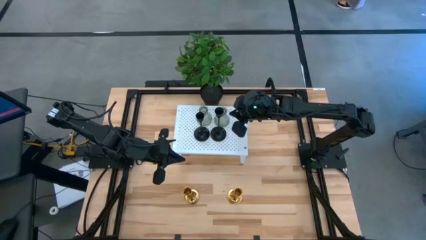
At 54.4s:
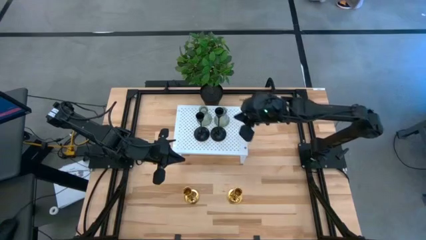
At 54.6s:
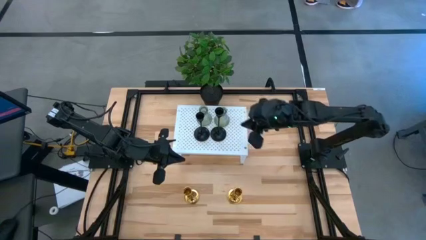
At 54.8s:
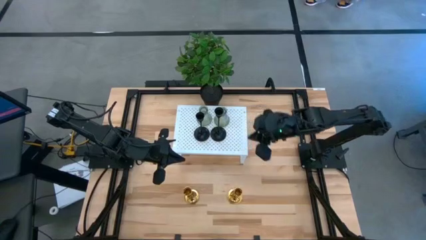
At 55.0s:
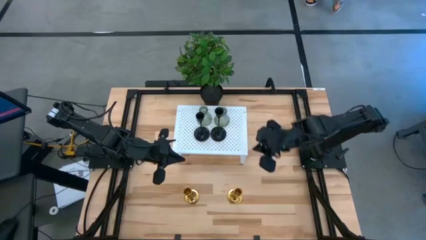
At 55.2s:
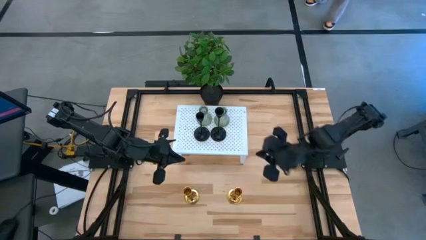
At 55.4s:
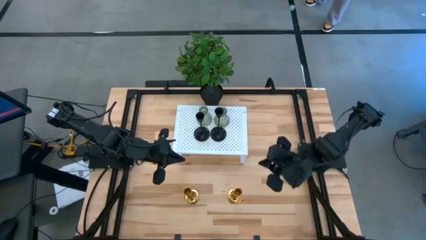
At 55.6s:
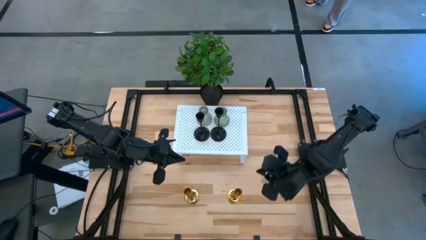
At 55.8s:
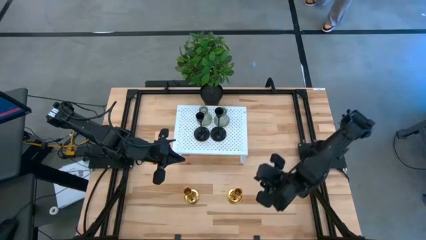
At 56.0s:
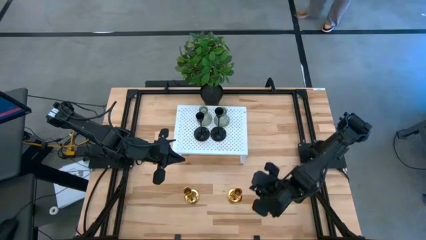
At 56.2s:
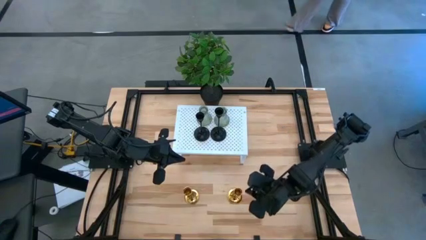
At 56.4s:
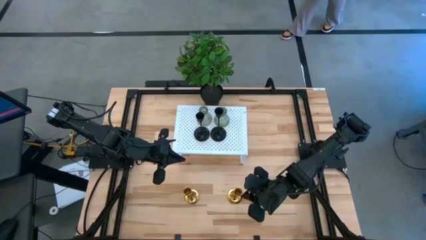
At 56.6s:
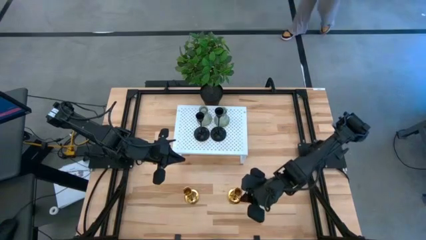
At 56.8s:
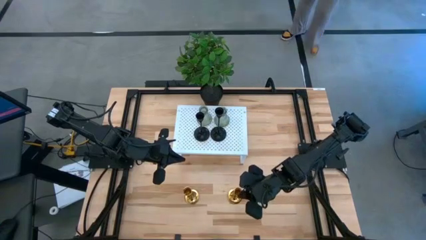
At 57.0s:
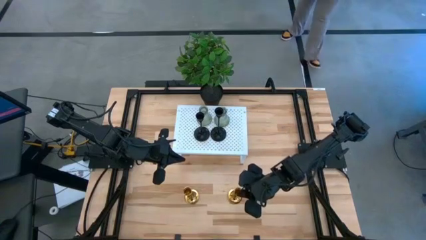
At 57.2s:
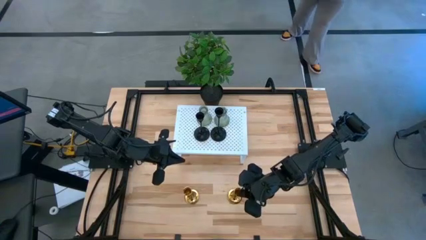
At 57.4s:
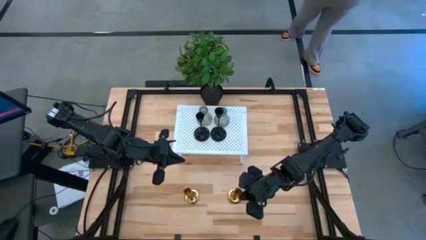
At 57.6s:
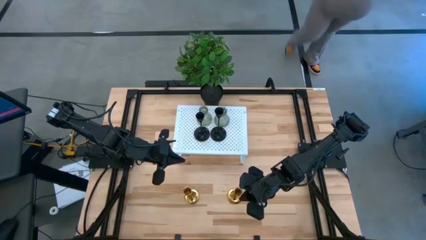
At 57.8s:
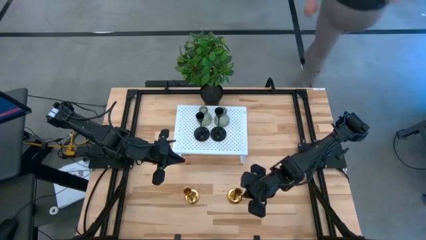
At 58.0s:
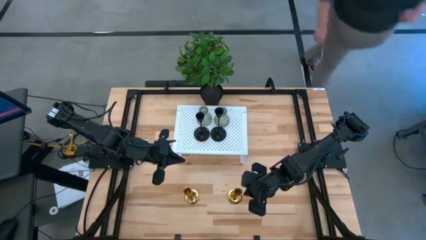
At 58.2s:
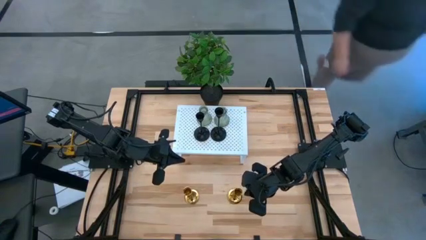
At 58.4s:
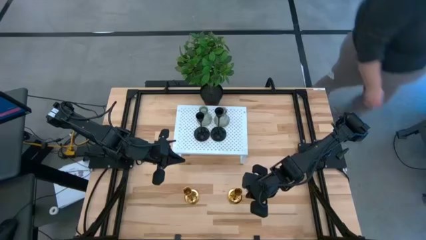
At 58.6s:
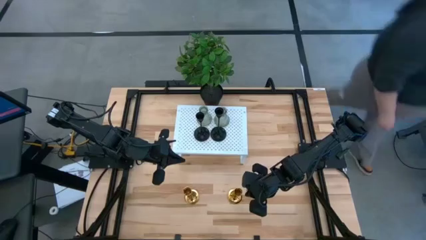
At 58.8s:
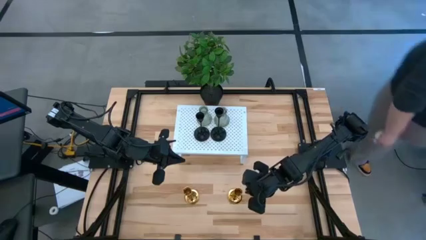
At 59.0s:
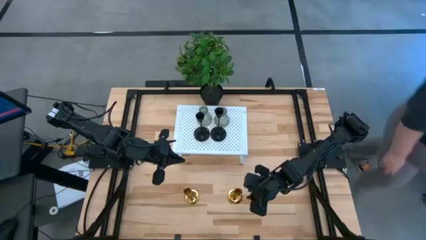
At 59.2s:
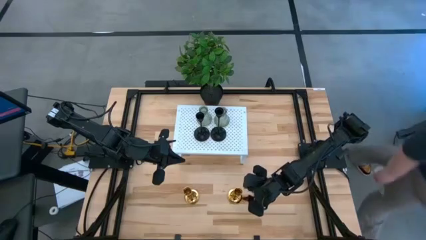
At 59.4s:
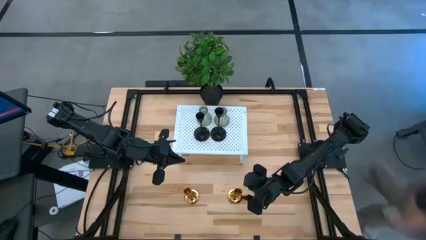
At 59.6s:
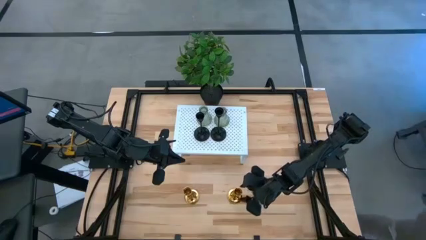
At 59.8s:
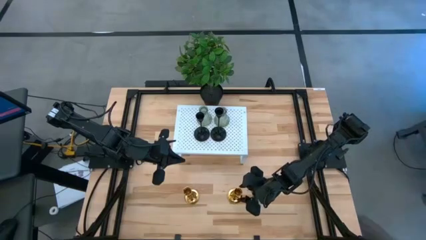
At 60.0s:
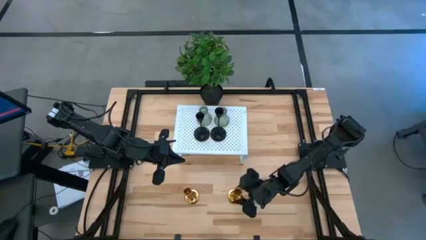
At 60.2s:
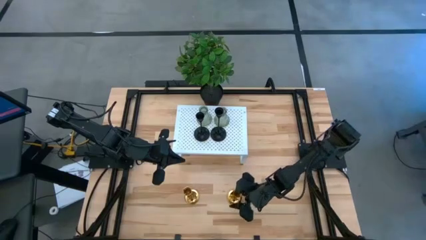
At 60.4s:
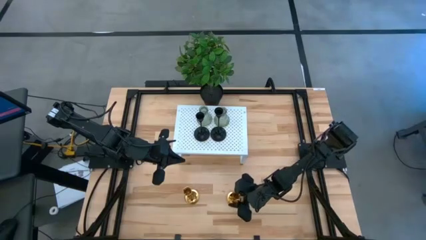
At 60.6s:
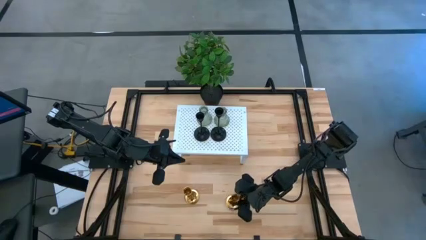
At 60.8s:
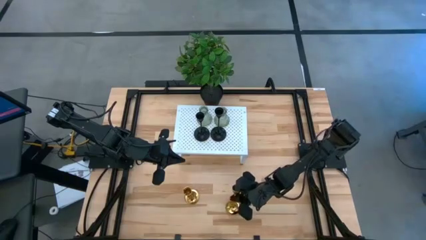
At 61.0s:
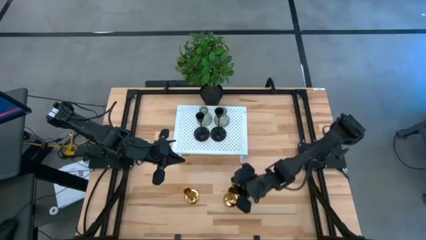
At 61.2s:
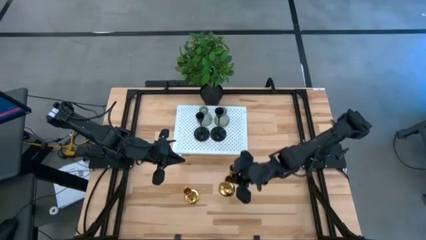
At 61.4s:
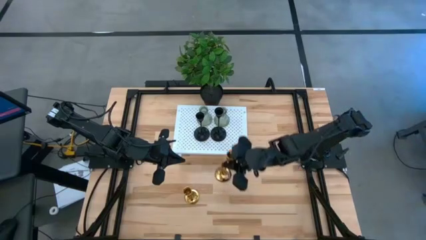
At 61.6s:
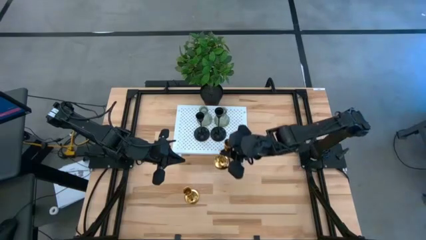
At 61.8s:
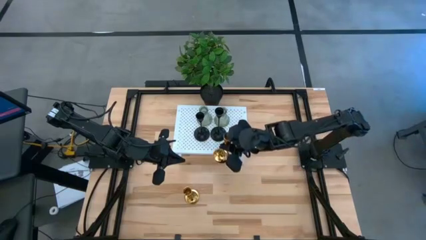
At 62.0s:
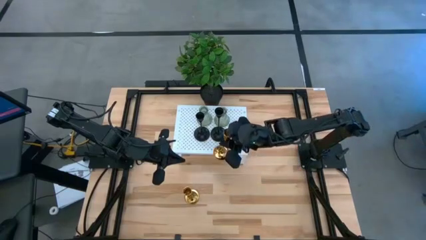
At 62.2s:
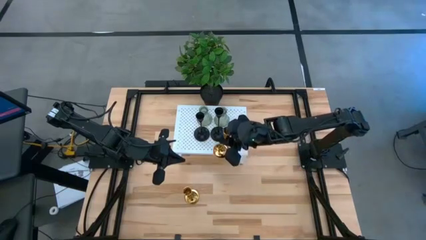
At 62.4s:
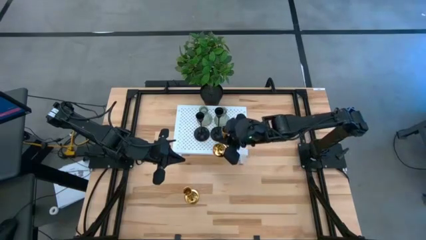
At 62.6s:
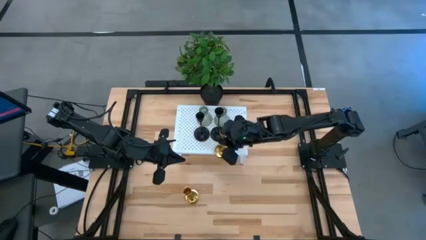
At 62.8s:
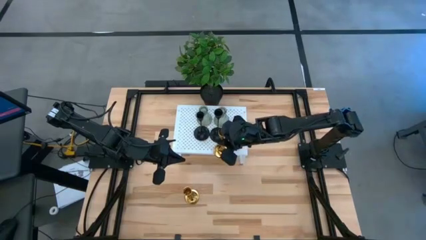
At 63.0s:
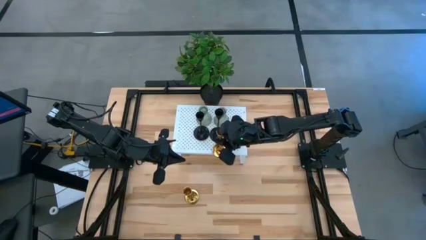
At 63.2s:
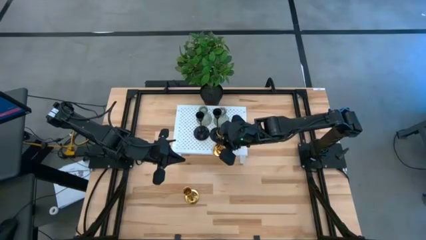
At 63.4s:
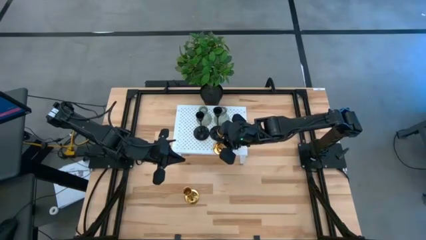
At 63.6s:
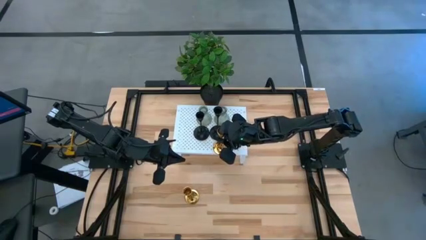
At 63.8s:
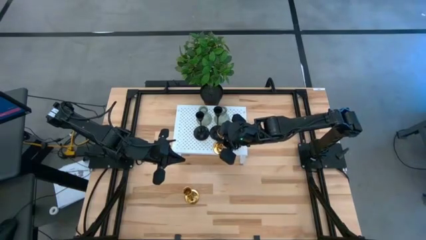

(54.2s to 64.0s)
Task: Pick & Place candle stick holders
Put the right gold candle holder on the shelf

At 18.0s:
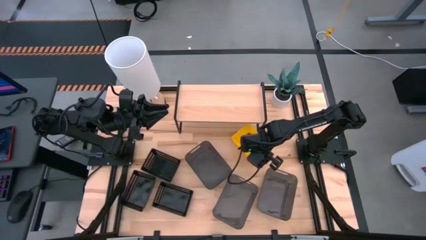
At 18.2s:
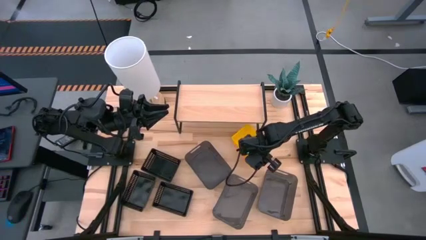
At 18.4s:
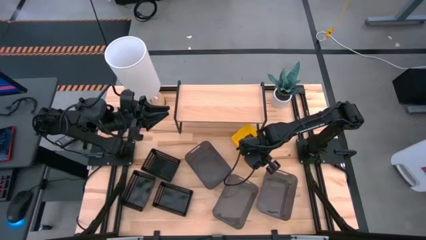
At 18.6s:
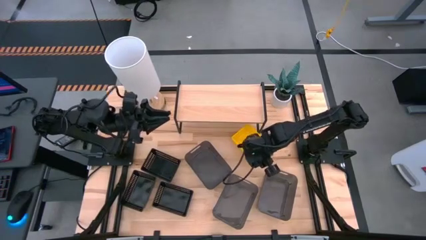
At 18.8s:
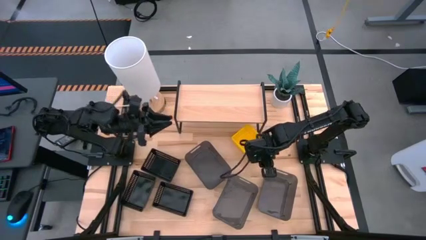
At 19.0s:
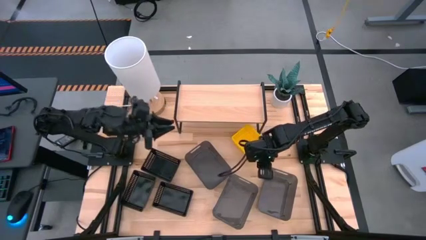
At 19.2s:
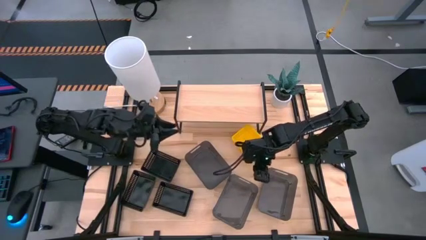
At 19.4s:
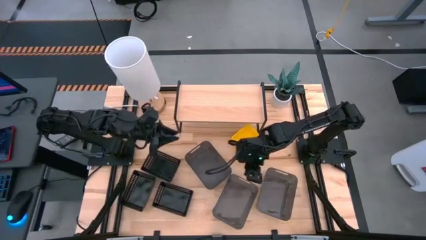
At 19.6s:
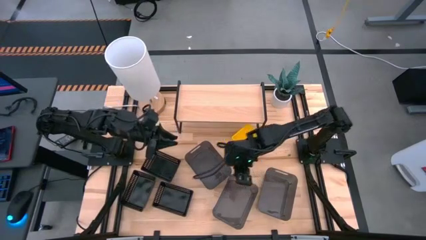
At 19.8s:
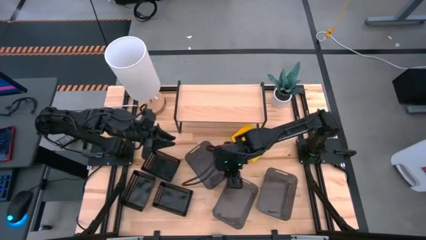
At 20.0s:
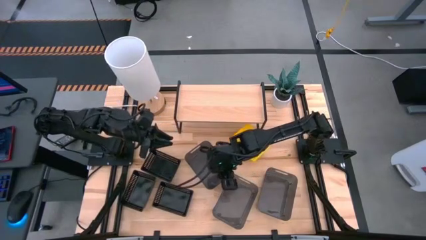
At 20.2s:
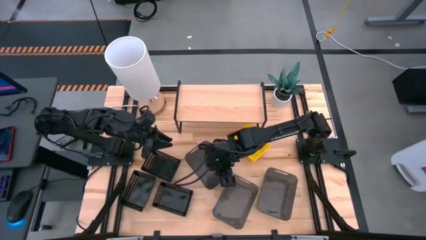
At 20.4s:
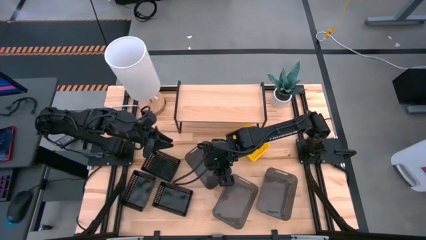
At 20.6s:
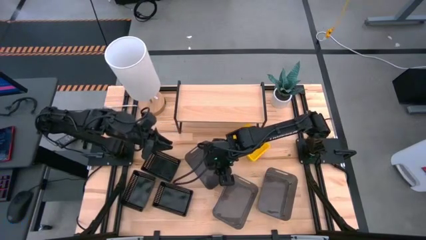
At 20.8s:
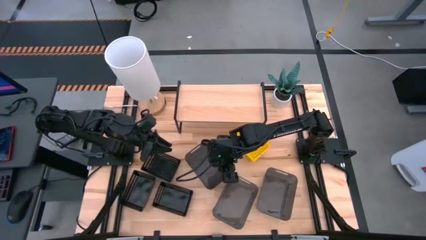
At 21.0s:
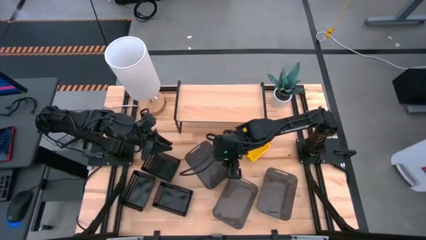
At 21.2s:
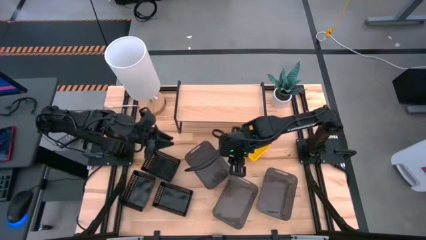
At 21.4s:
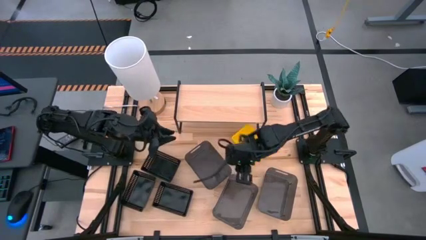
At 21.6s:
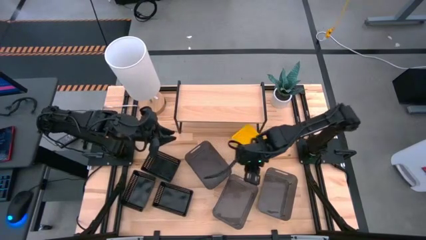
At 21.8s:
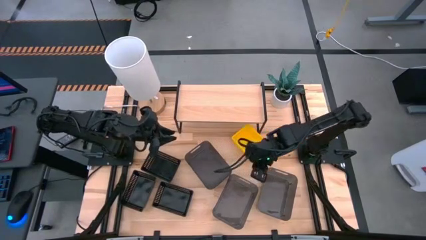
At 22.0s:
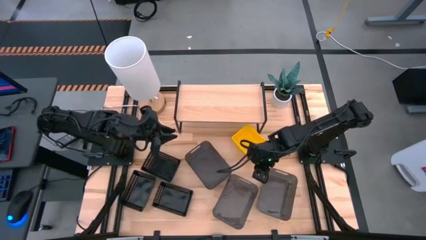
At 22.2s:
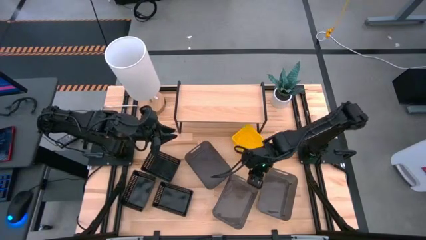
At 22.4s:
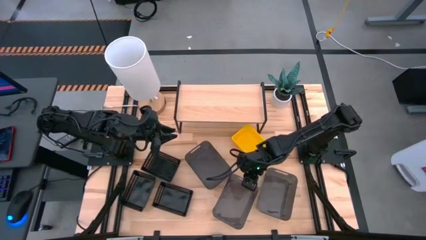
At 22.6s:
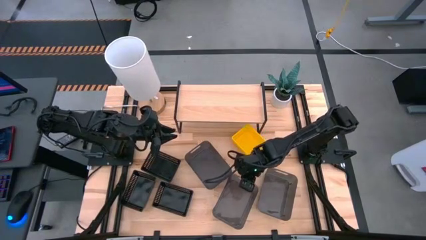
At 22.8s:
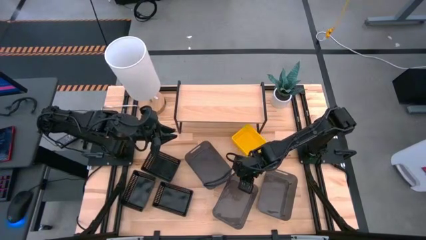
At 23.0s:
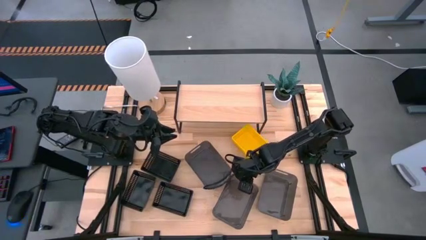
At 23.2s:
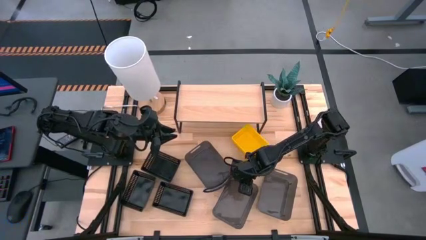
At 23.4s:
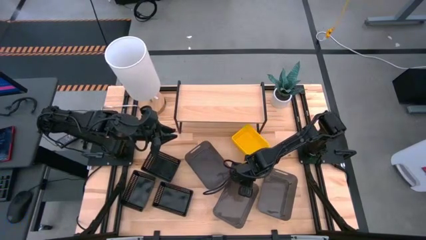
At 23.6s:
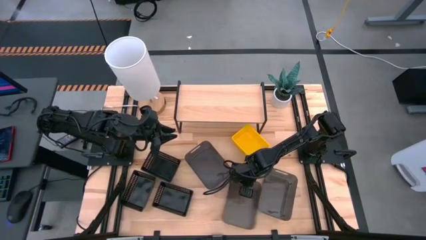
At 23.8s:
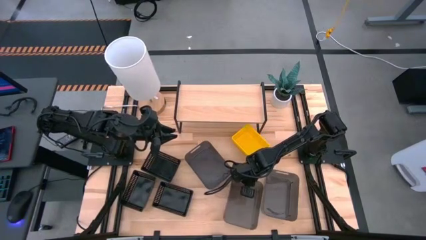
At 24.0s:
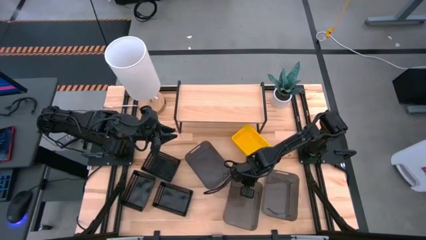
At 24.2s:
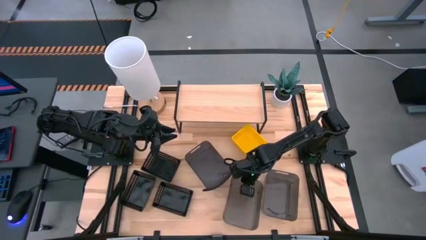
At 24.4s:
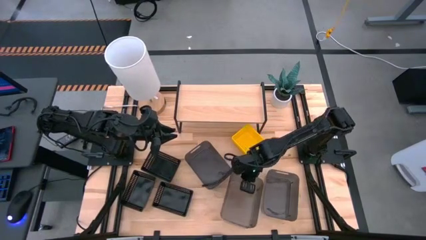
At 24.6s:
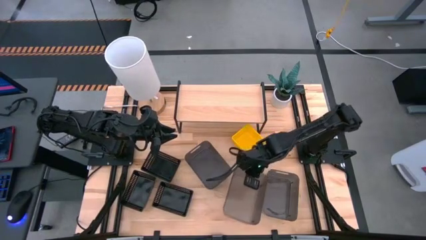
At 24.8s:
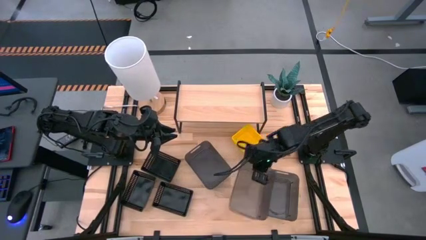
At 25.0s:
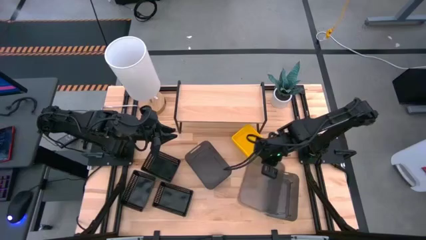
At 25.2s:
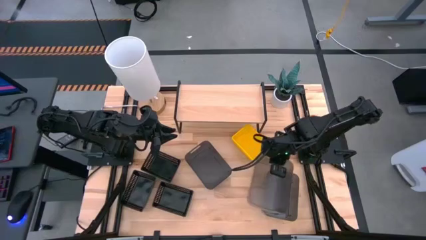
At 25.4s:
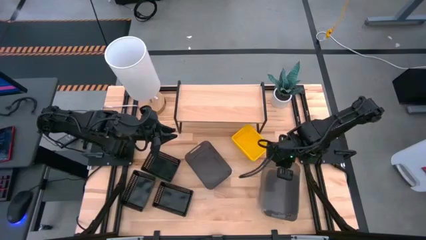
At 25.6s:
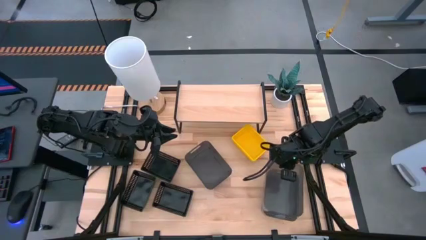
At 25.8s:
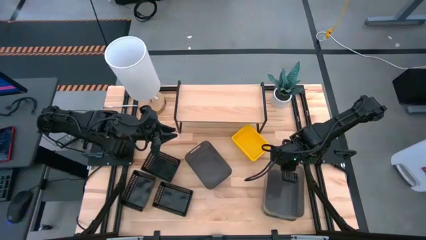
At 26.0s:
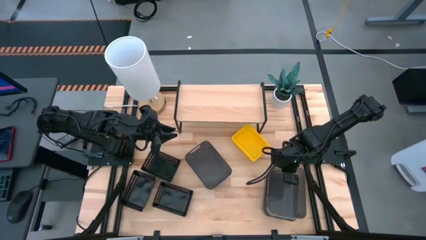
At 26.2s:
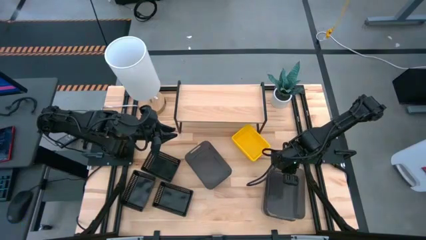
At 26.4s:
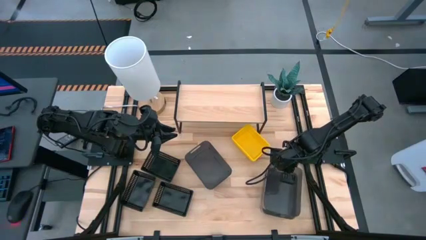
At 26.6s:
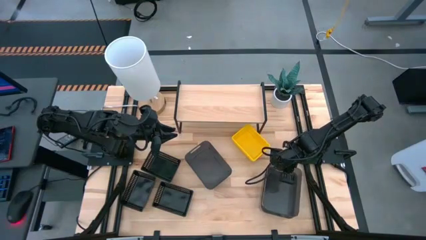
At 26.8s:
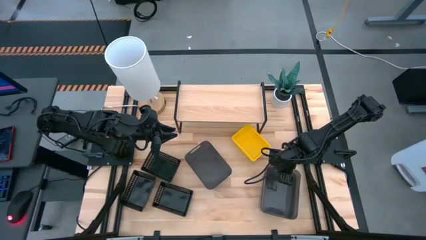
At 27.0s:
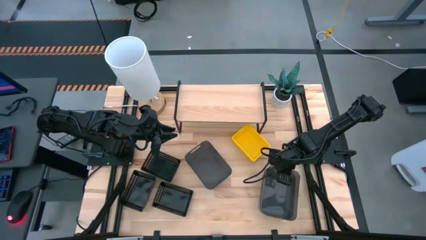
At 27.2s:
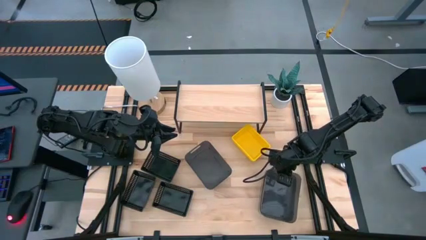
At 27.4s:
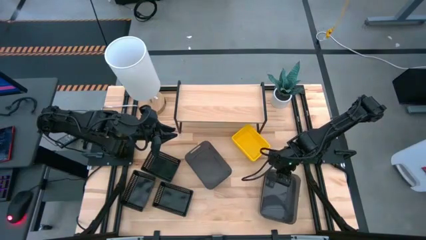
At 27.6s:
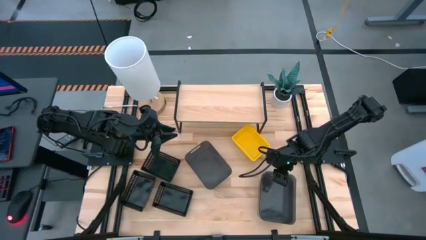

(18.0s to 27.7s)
Task: Stack baskets on shelf by color
Stack the middle gray bin on top of the right gray bin
